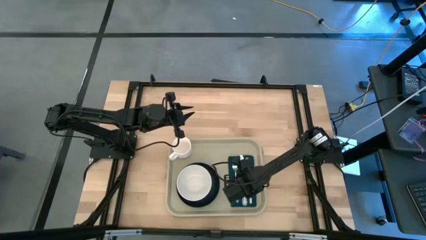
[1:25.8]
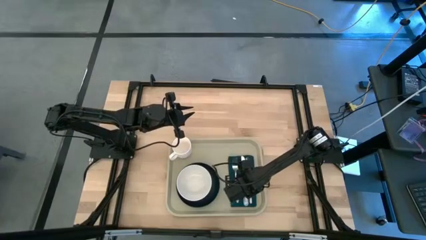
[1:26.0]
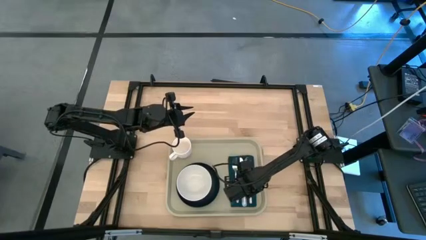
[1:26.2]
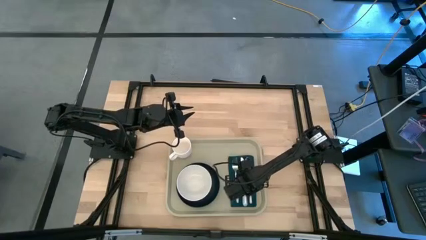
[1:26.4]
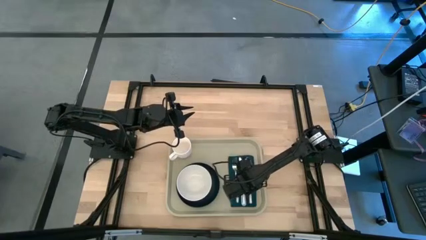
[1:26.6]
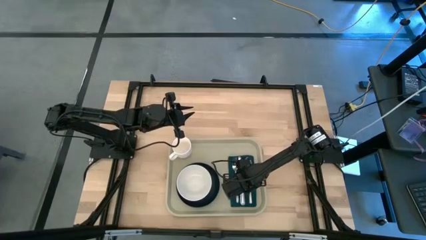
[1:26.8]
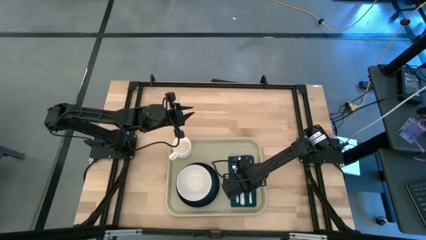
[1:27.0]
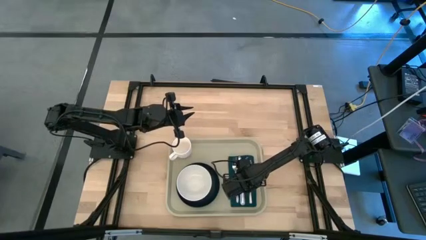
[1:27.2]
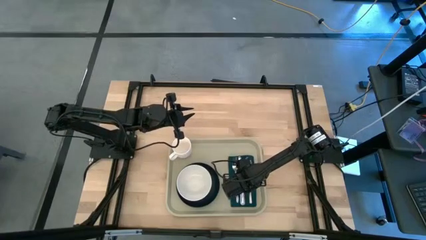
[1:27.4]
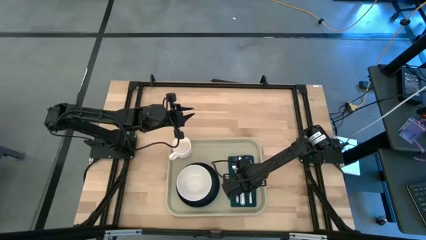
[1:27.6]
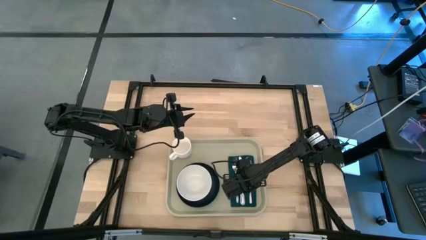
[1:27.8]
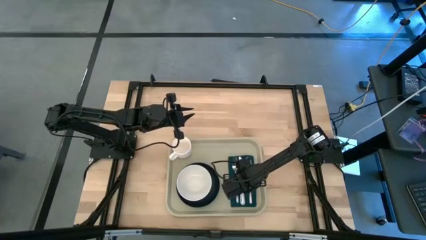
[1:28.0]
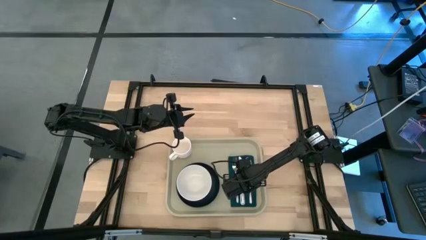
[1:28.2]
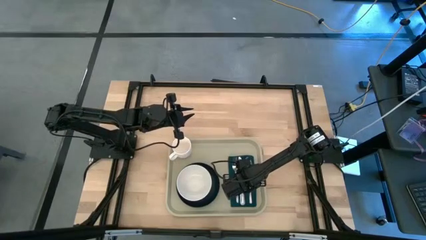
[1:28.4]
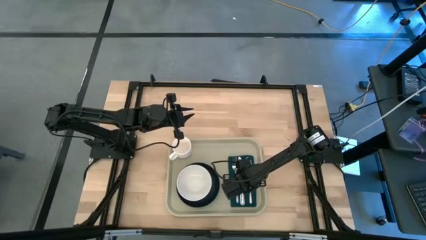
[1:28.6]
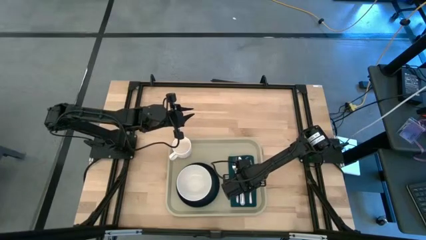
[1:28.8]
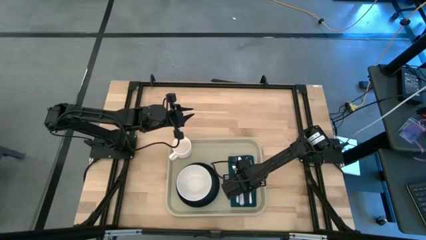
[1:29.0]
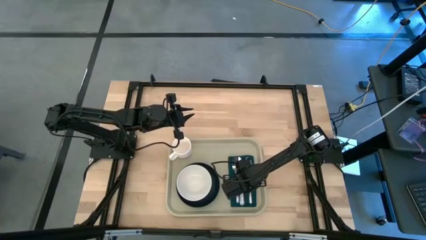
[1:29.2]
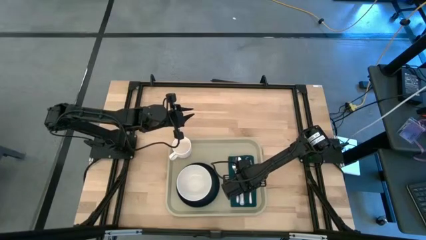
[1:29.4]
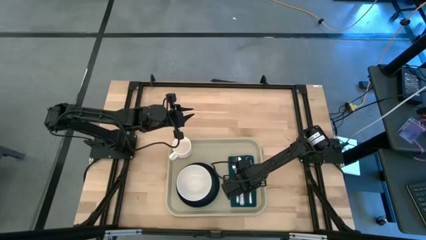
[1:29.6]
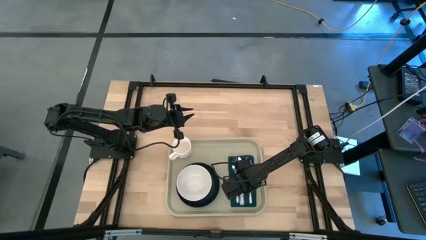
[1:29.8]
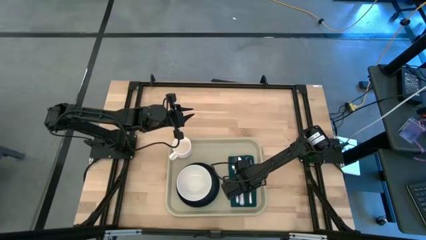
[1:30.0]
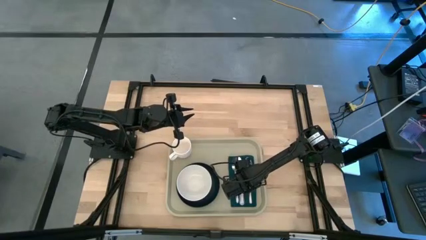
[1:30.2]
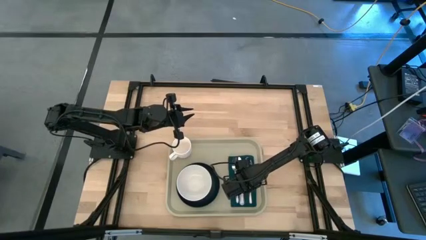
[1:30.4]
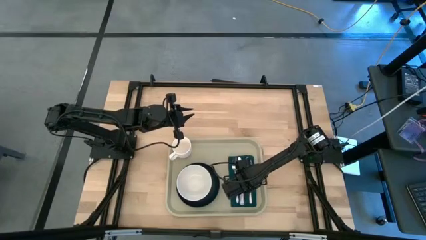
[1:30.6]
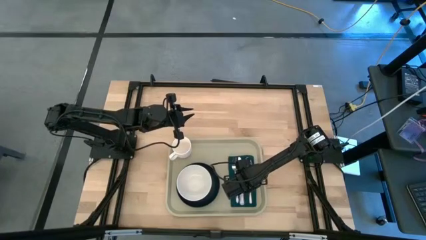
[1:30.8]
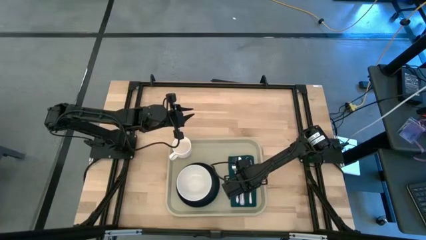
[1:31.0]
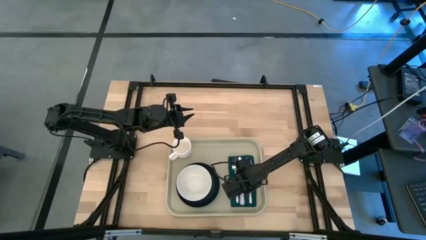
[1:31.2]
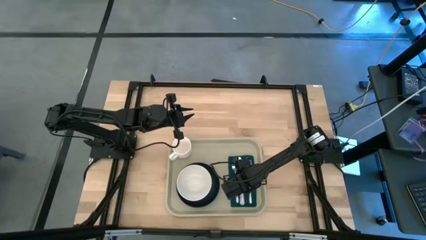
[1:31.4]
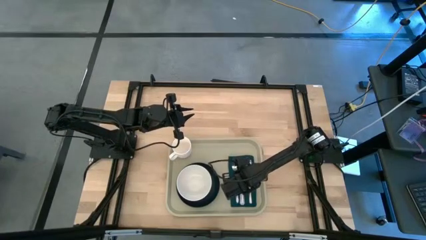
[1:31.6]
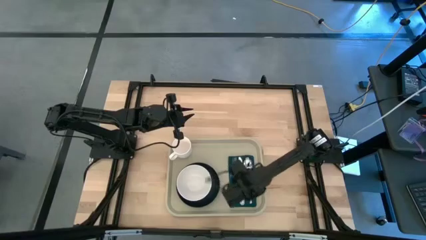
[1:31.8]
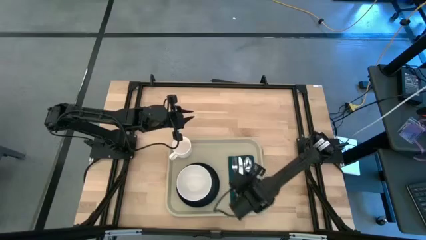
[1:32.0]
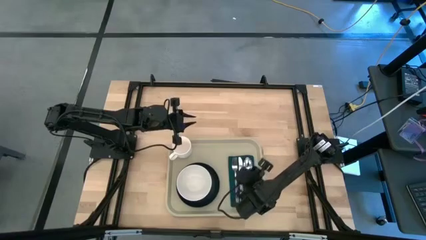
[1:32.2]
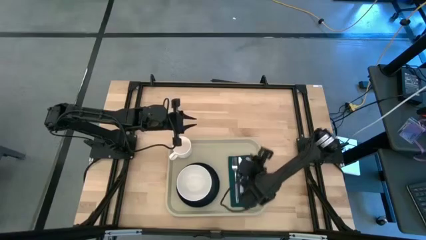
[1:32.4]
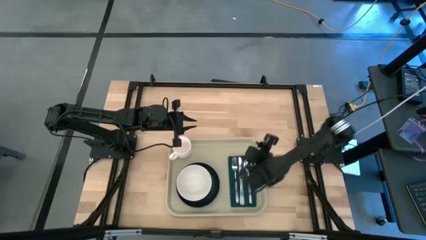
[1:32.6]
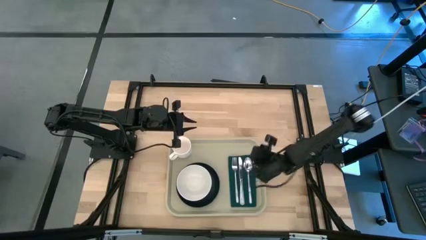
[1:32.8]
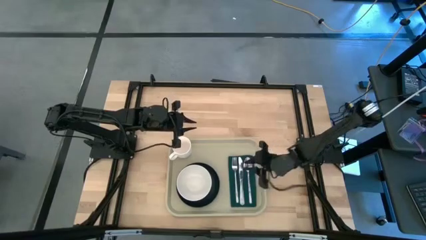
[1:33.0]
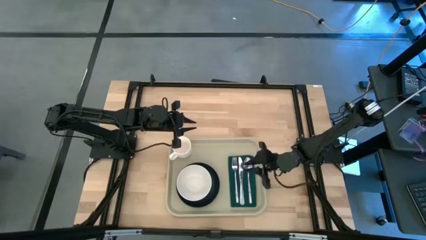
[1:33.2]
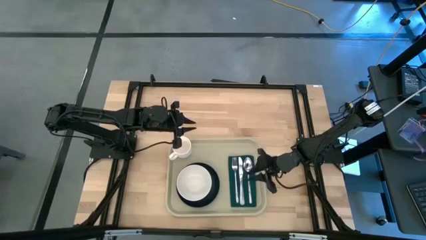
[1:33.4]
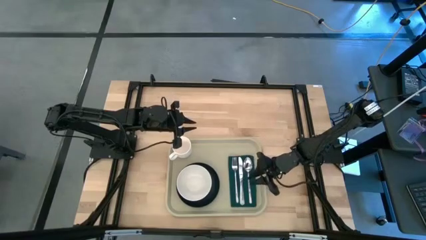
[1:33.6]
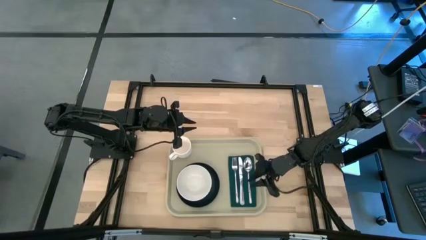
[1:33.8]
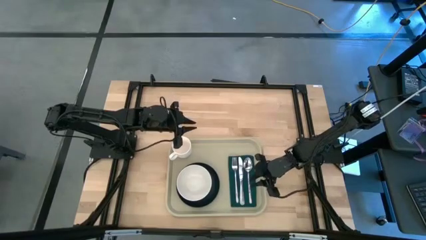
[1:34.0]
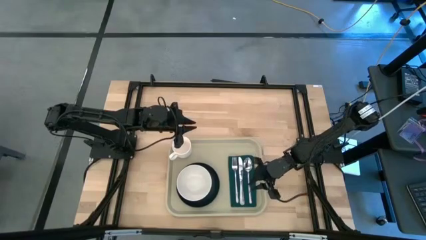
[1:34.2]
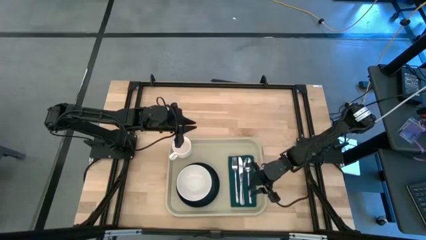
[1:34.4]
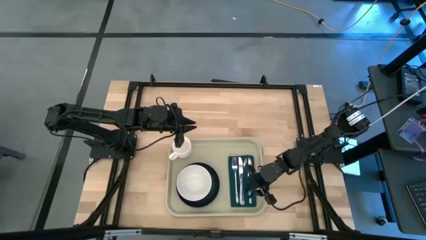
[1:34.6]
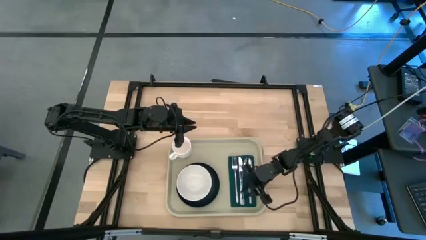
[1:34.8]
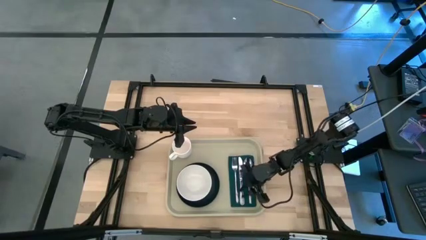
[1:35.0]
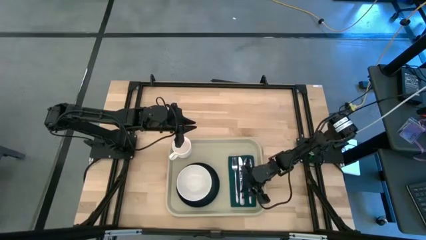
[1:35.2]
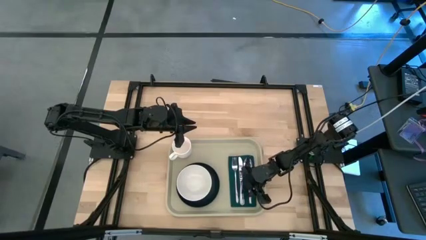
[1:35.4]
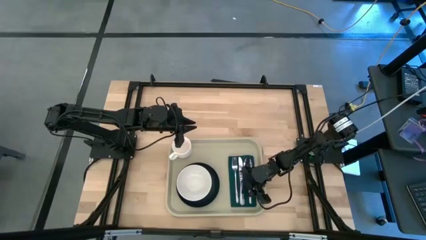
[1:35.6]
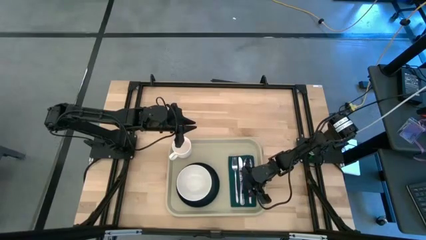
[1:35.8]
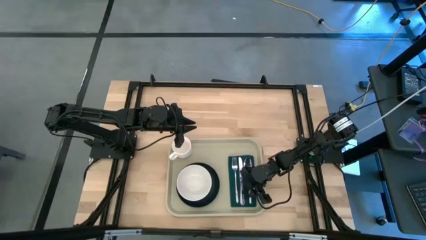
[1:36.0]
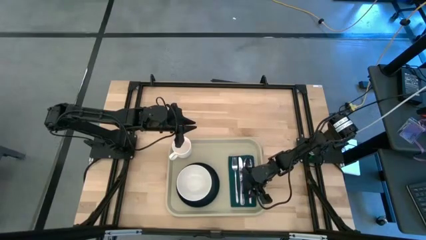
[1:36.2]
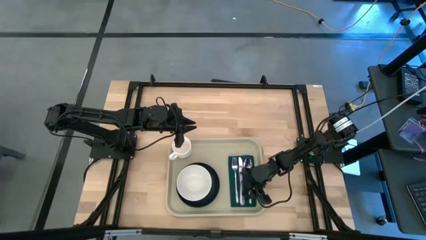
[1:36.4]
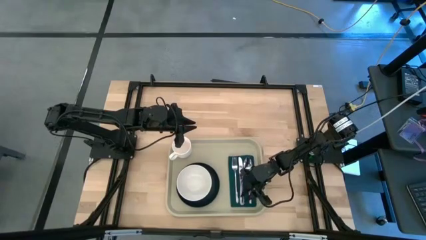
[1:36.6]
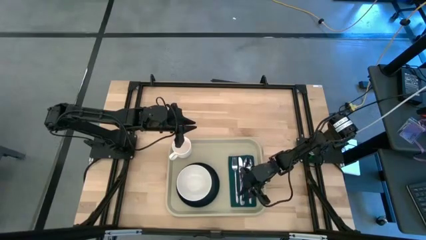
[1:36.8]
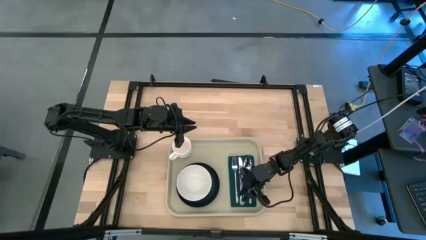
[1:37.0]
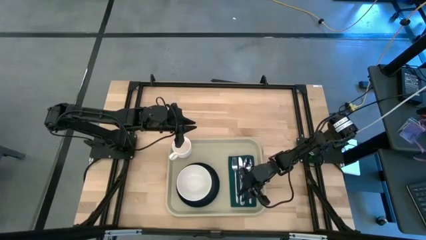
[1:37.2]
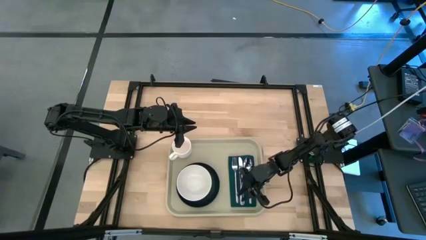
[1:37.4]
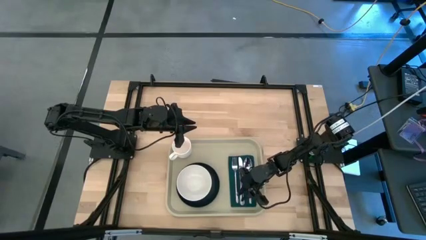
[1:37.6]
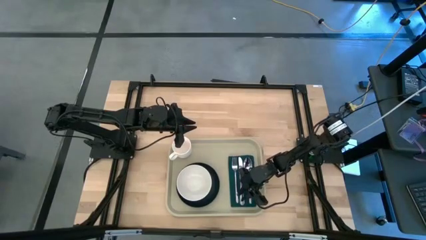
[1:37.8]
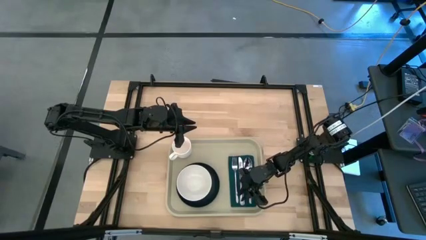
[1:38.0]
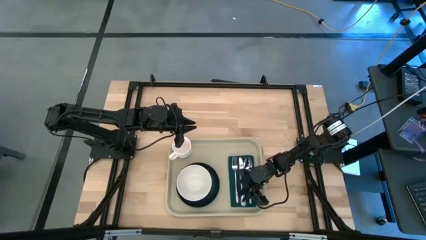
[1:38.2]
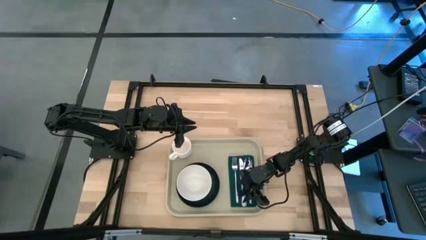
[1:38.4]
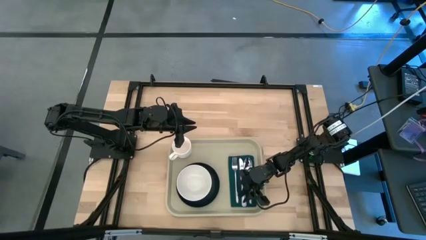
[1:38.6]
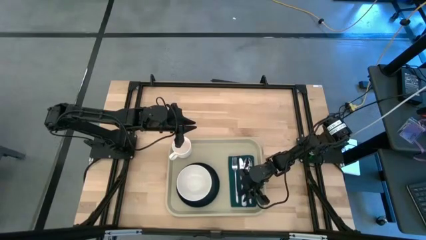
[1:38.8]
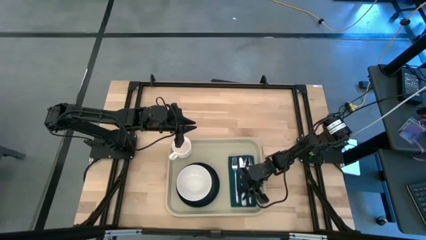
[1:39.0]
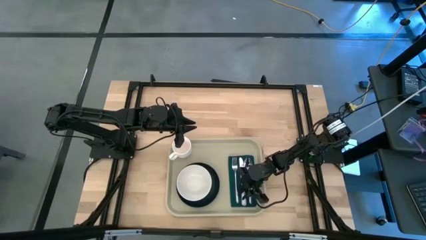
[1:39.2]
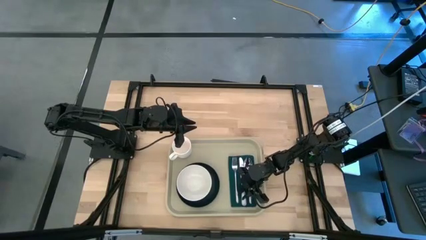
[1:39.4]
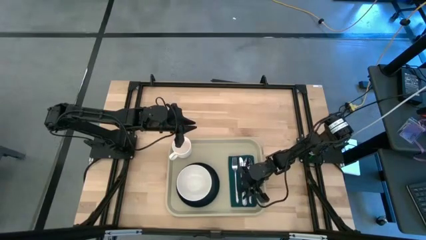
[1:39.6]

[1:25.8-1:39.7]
Task: Set up tray
Put the silver knife on the green napkin between the silver fork and spoon
